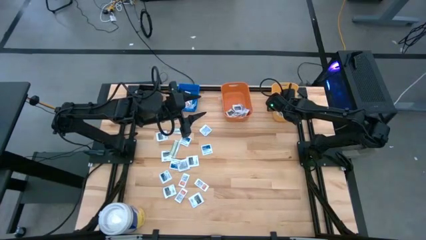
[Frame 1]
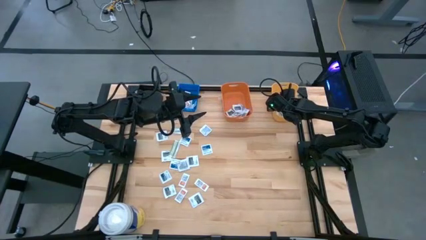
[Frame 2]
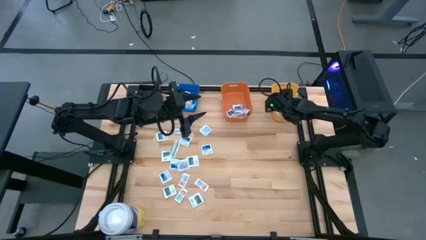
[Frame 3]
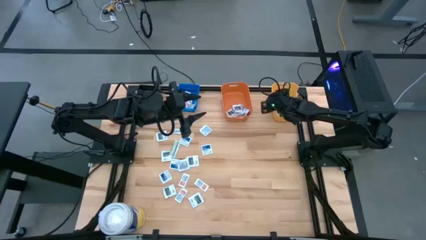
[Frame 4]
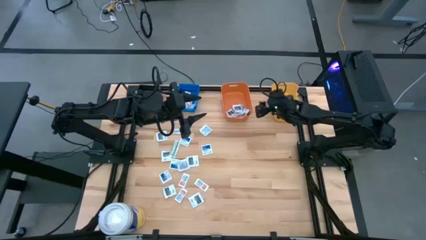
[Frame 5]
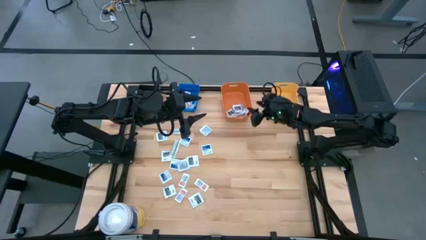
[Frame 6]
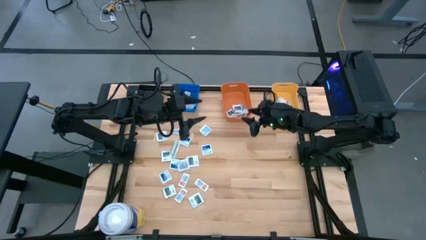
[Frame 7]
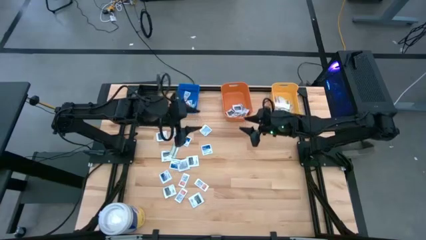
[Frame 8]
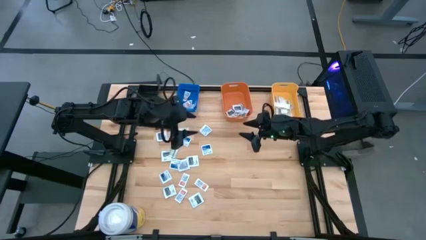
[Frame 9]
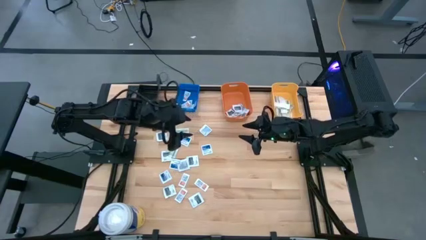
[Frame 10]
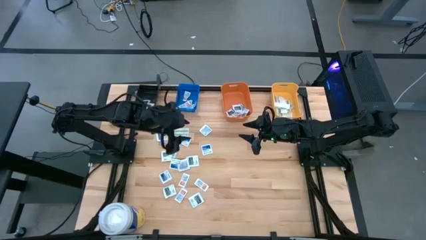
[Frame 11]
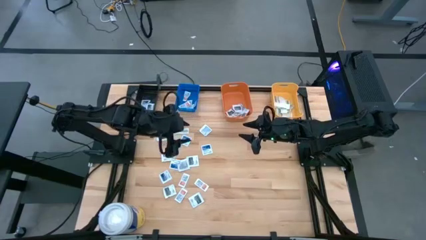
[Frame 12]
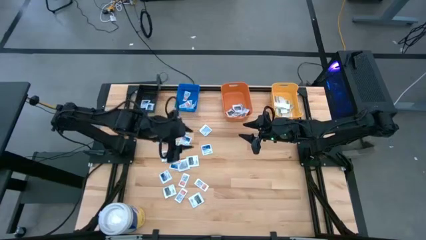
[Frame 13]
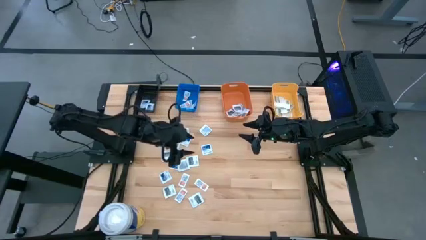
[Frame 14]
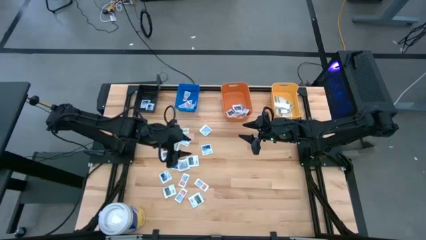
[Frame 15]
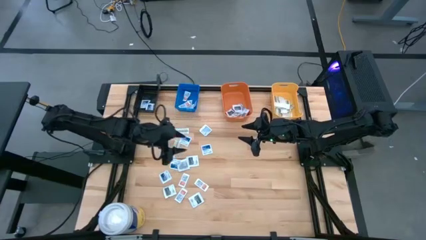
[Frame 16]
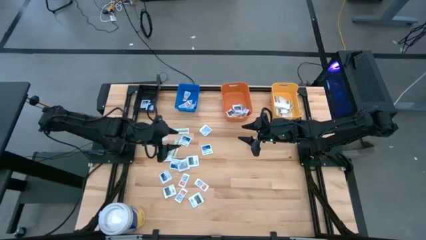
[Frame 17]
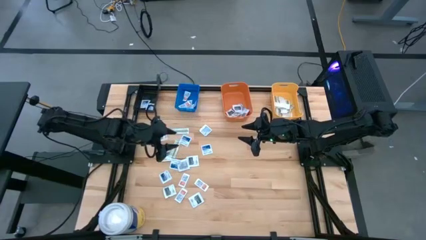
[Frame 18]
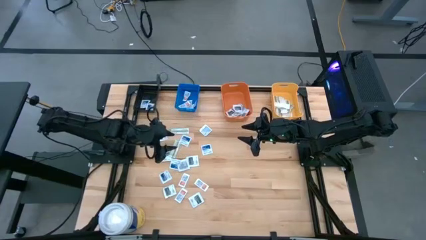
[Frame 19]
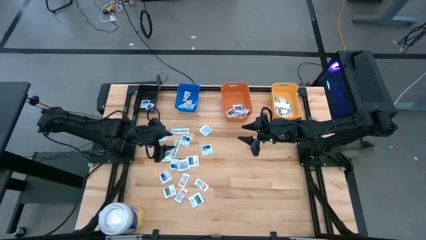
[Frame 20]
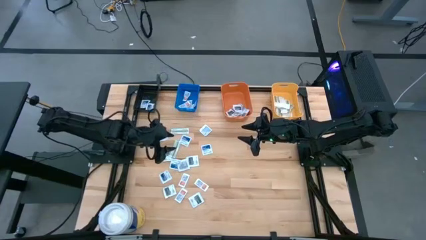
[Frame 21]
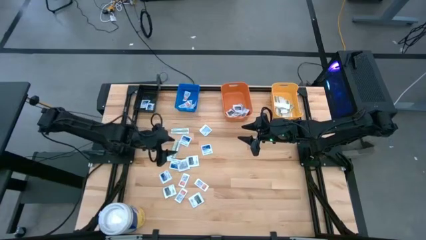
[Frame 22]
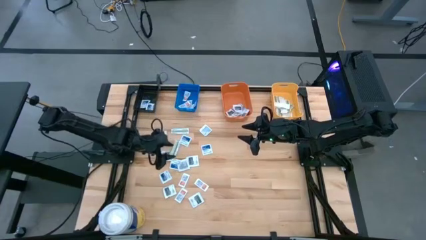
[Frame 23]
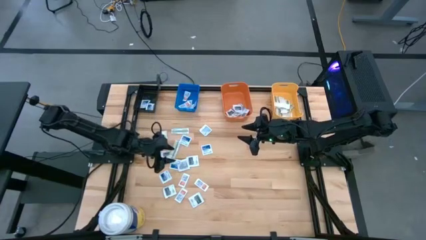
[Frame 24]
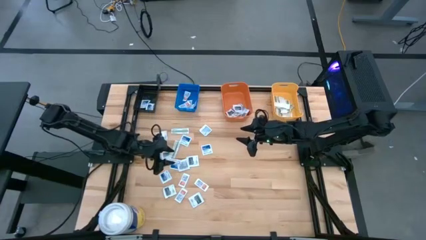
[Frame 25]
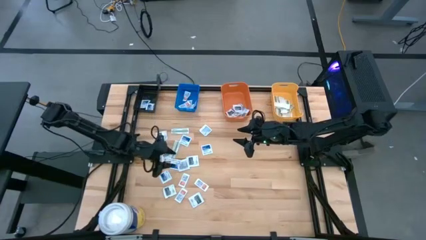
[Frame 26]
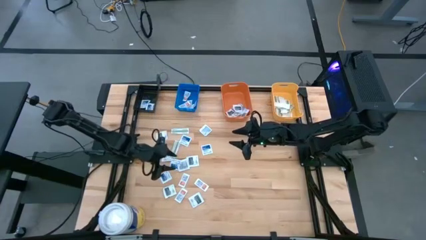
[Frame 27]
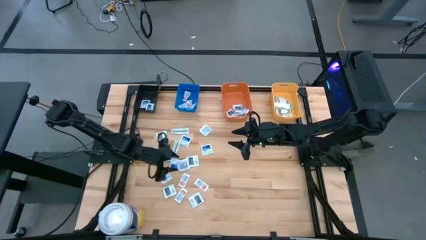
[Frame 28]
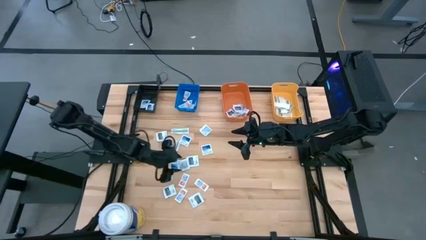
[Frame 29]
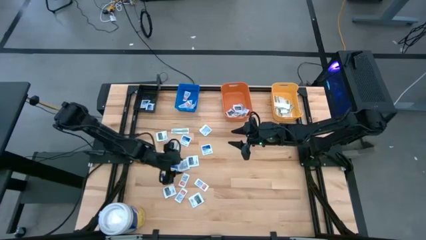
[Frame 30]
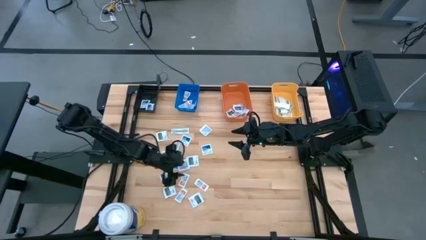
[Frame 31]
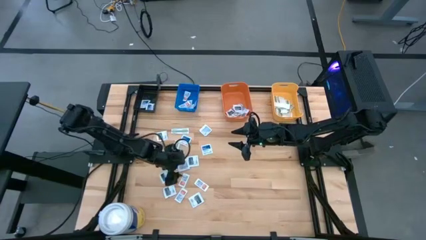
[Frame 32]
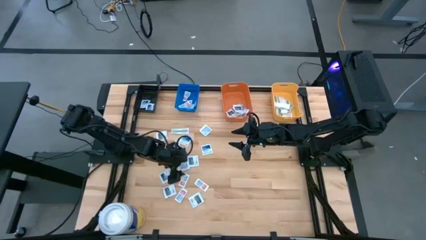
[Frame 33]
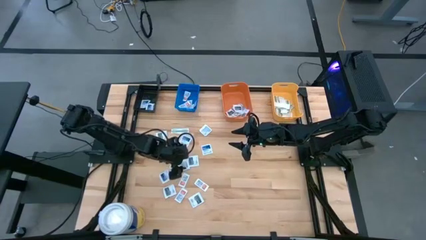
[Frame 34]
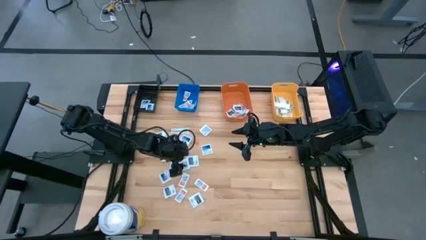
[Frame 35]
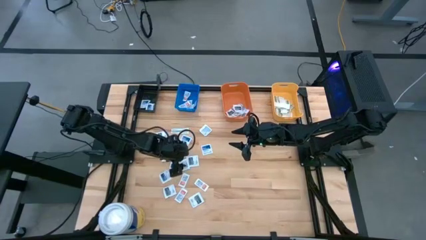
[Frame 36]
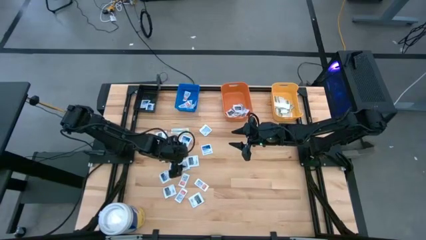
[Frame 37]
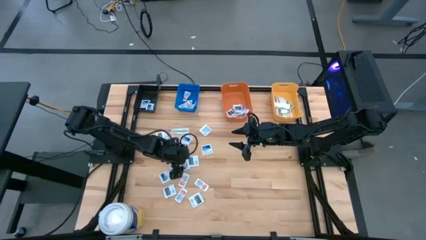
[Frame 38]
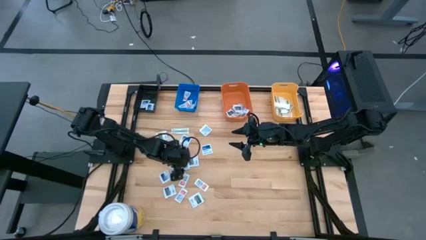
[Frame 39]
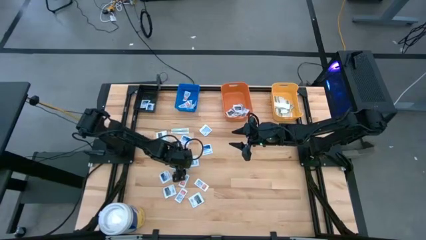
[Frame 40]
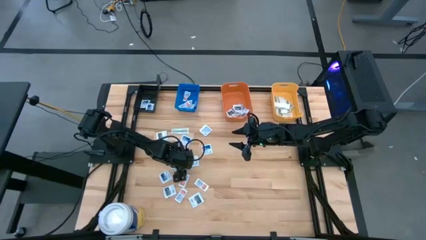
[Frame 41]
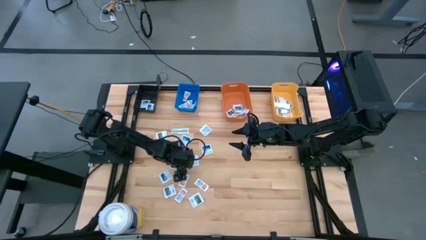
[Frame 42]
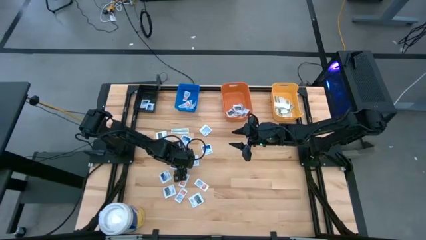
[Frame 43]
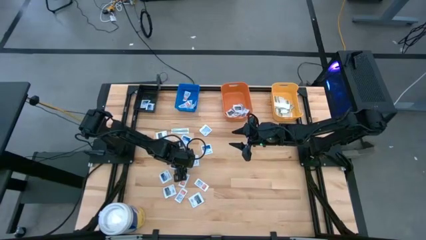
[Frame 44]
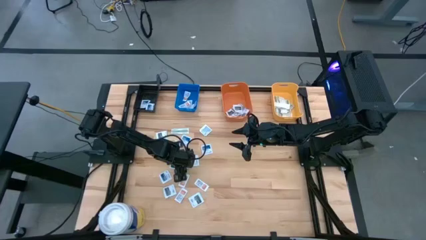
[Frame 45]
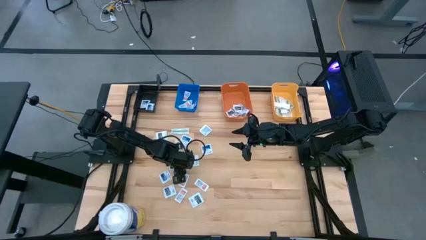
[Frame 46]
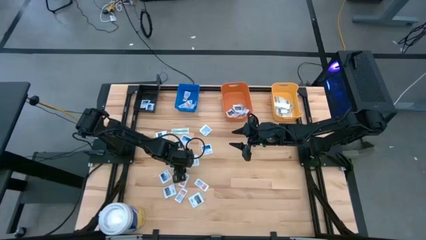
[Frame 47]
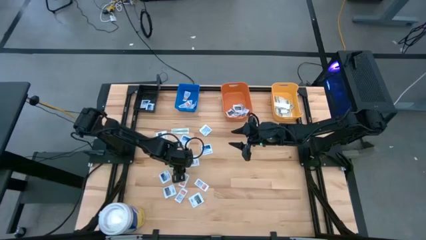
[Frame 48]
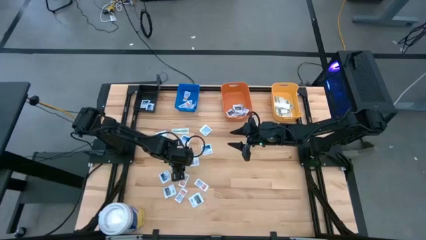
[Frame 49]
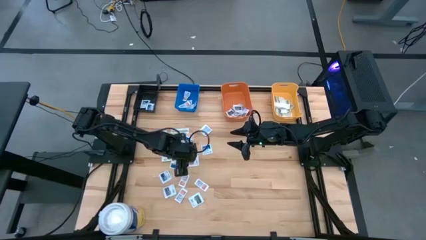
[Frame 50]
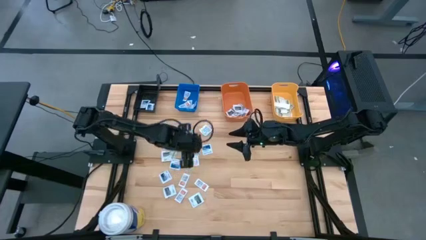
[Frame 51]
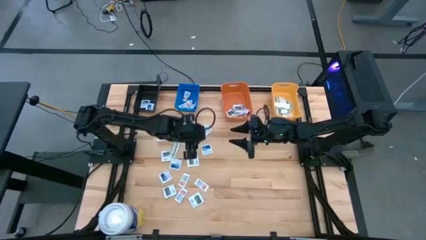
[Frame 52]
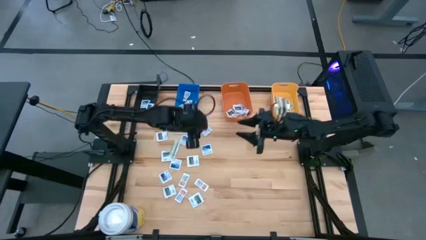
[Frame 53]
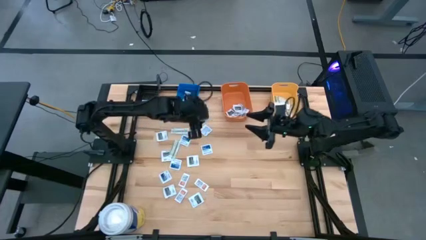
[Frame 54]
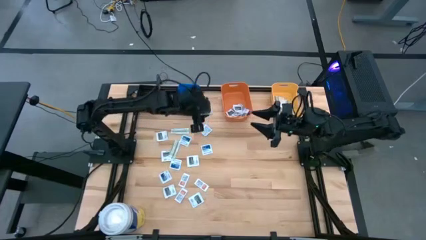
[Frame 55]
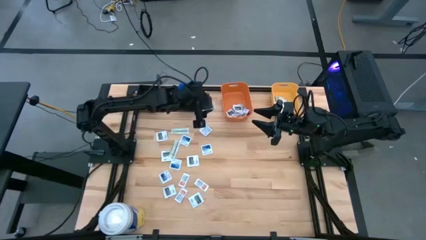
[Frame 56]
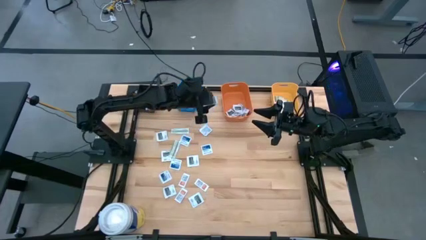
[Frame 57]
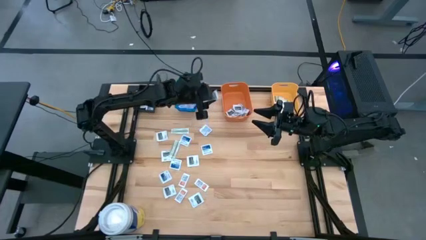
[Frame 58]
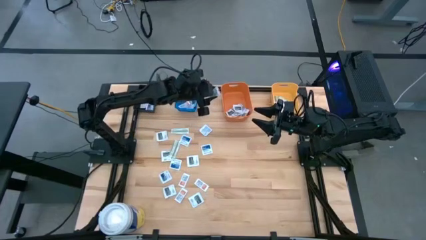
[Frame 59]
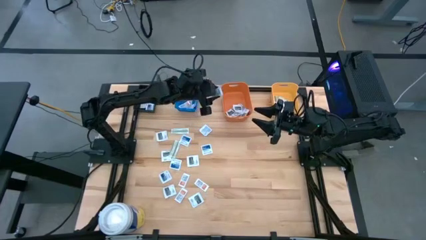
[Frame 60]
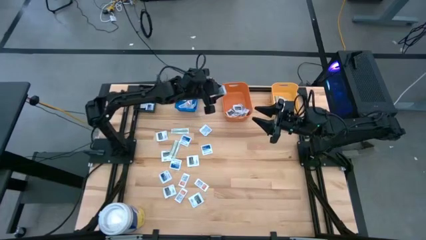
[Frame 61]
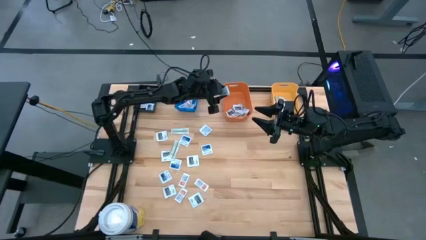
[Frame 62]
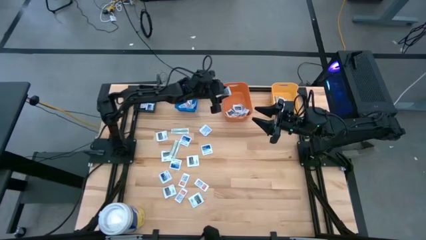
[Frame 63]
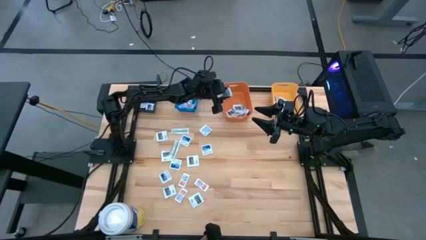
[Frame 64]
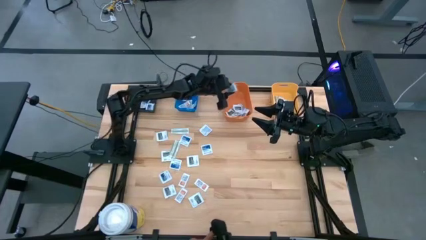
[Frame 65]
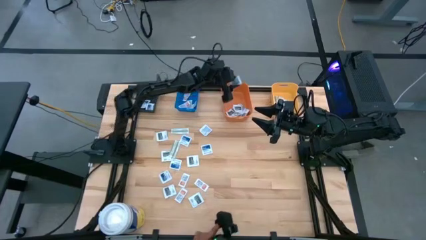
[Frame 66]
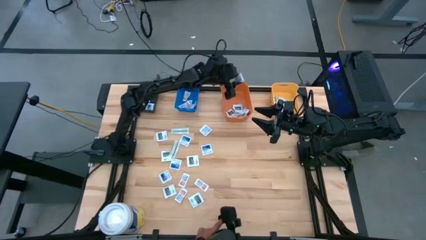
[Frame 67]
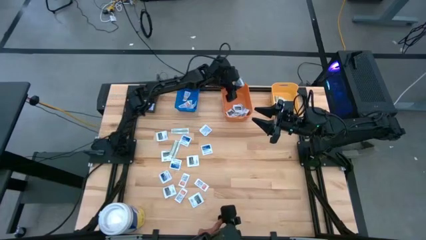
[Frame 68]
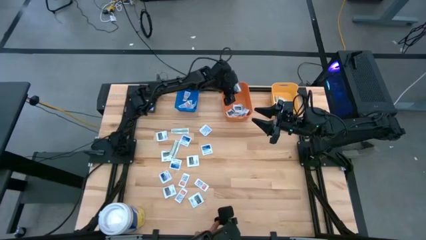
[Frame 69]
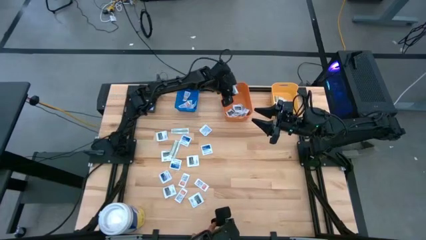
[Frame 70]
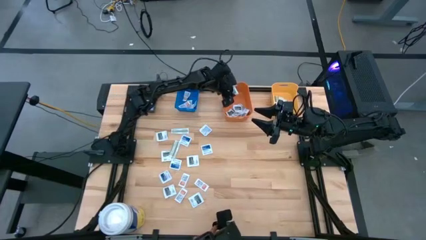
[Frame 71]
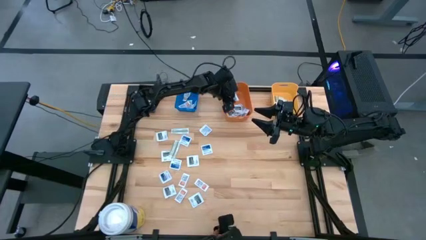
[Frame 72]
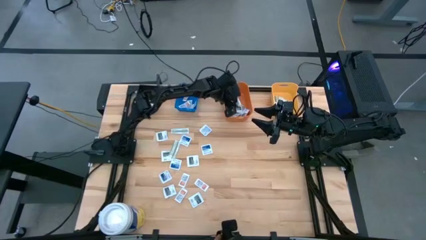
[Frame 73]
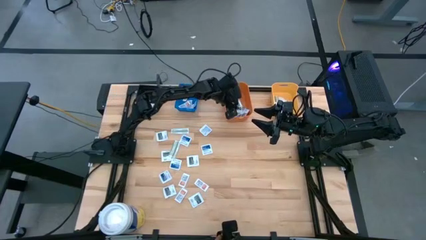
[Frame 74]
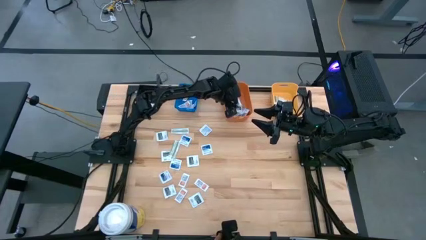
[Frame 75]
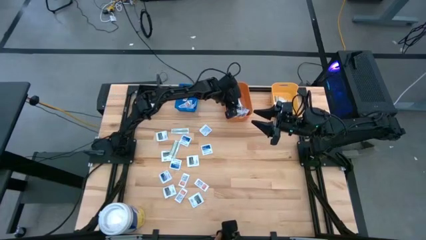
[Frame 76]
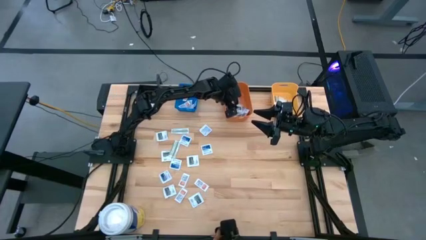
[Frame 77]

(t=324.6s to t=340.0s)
Task: Pick & Place First Aid Supplies
Put the towelette pack into the orange bin
